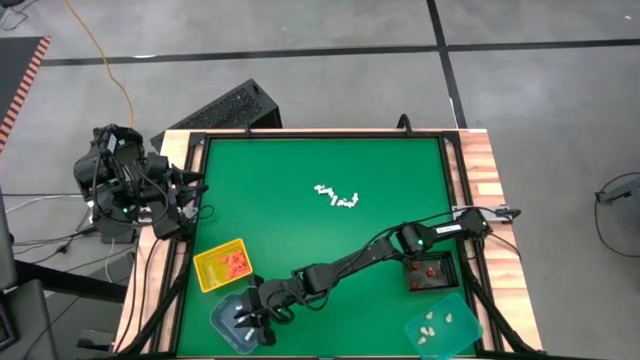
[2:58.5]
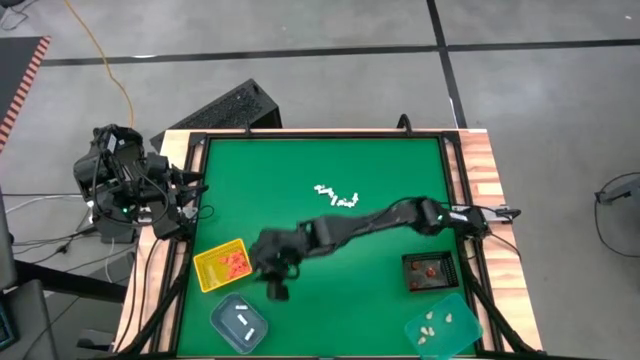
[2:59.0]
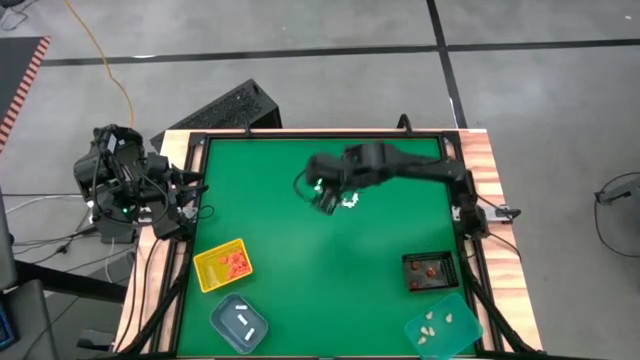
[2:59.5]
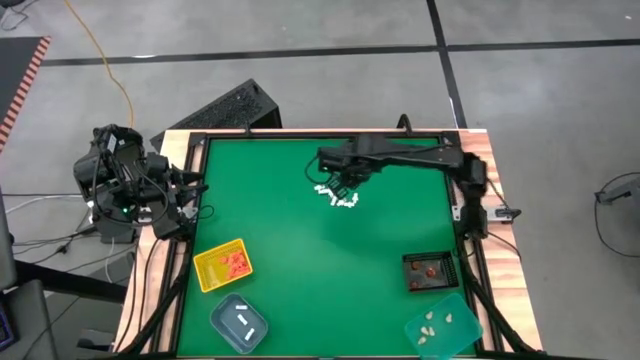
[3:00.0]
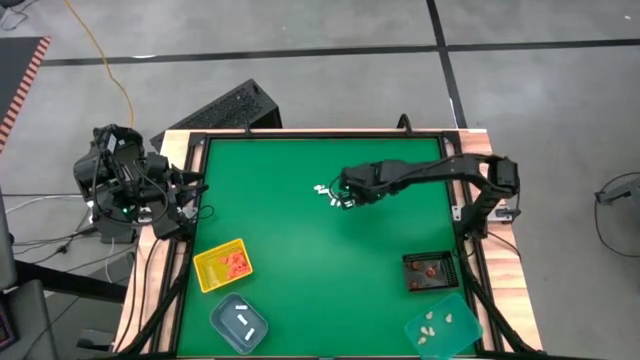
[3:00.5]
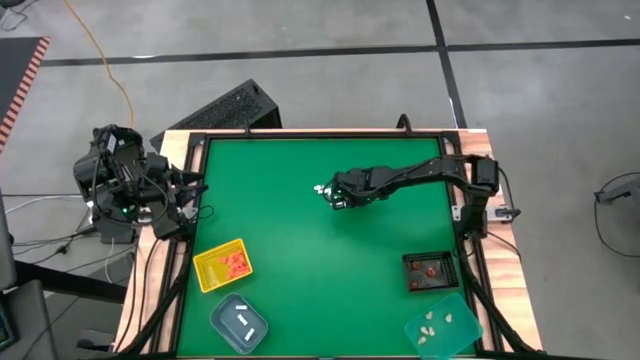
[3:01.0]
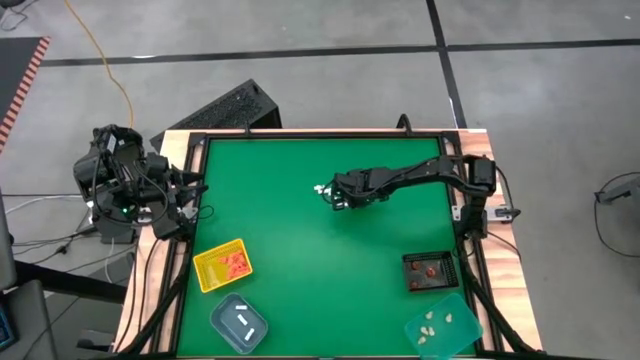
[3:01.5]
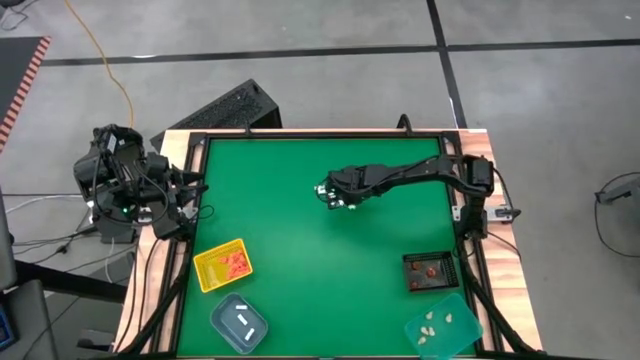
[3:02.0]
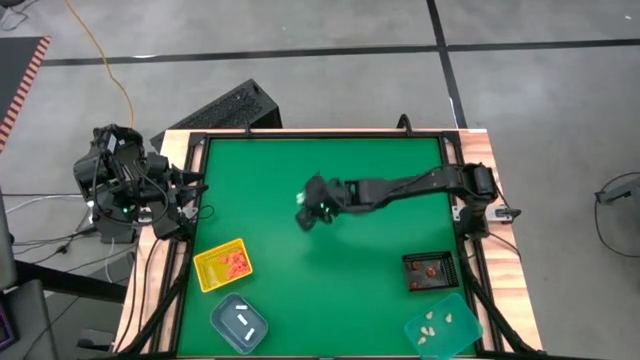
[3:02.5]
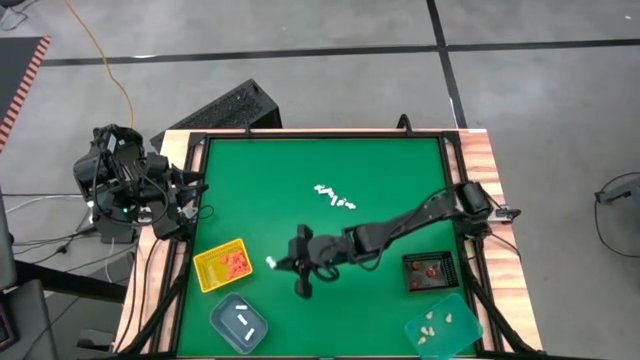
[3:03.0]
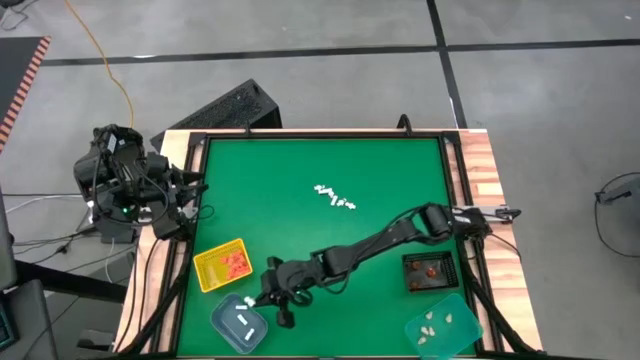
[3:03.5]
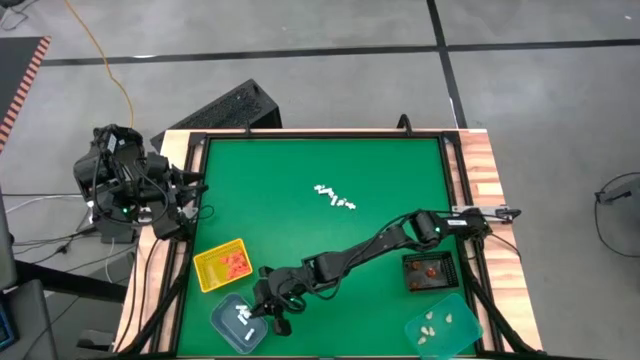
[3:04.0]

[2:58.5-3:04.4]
Task: Sort Halloween decoration
Put the white skeleton model into the blue bin

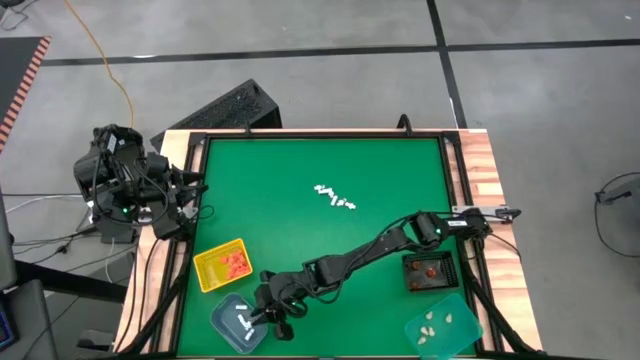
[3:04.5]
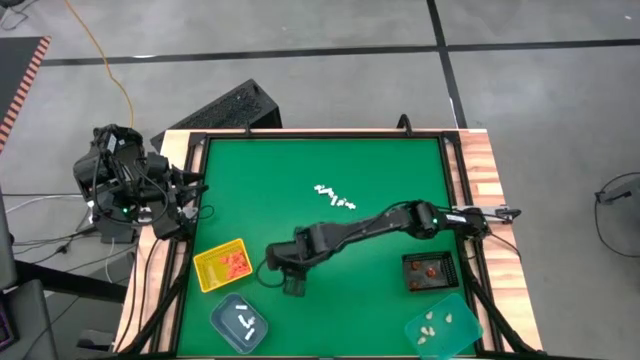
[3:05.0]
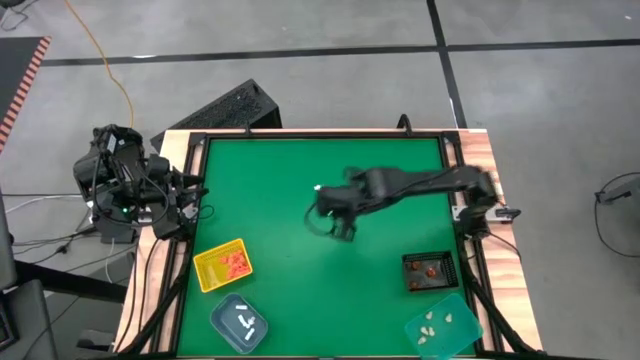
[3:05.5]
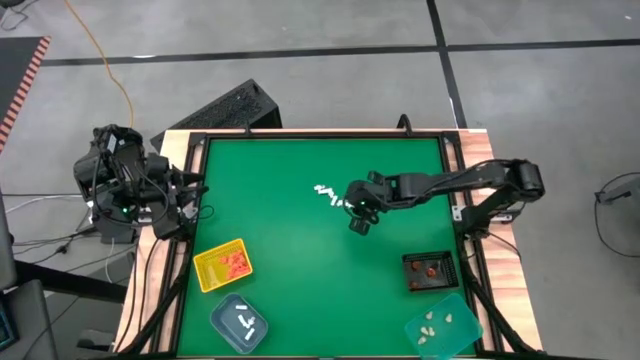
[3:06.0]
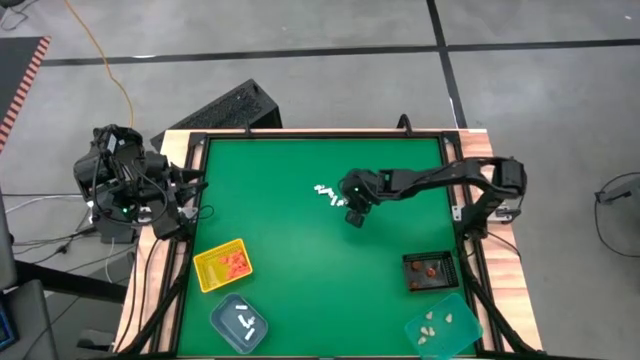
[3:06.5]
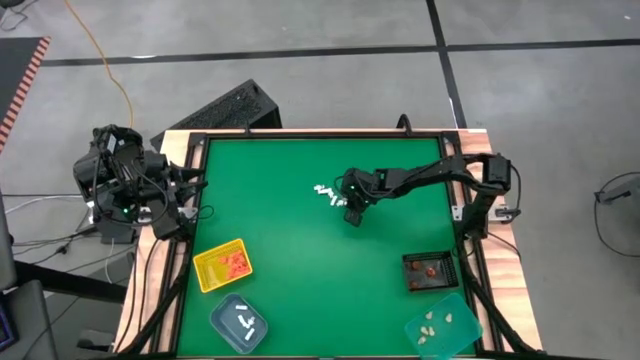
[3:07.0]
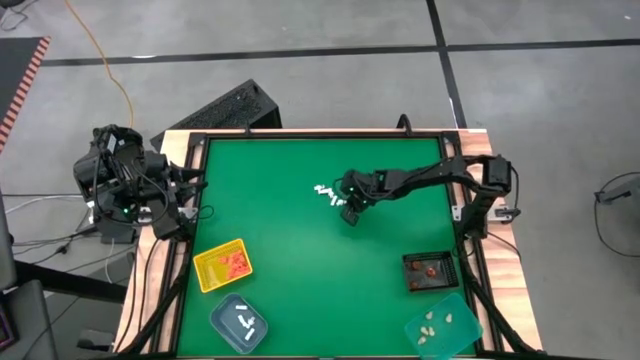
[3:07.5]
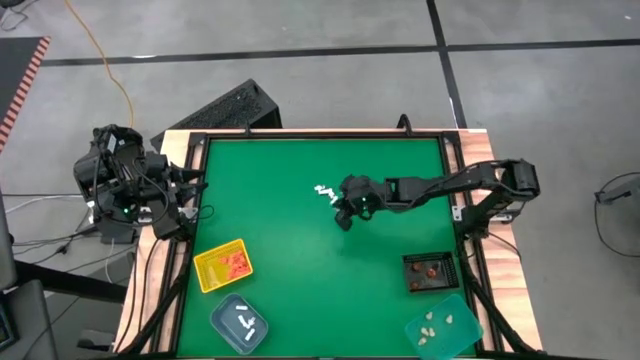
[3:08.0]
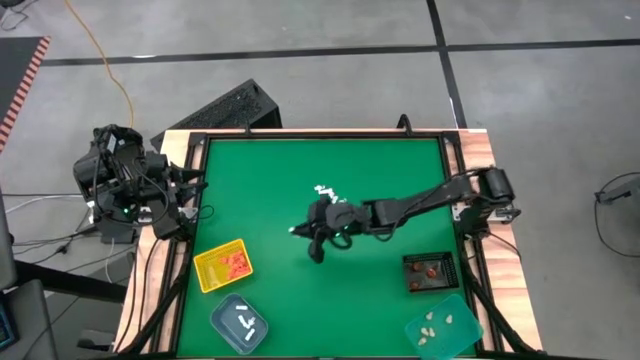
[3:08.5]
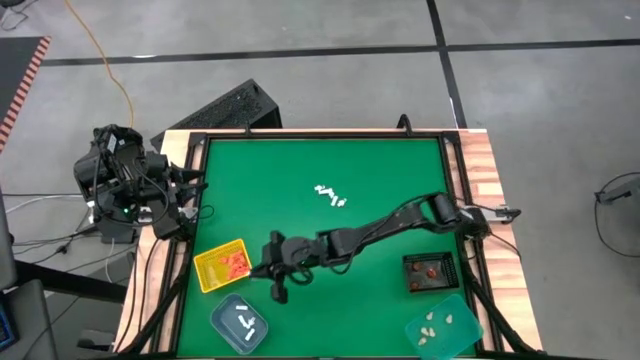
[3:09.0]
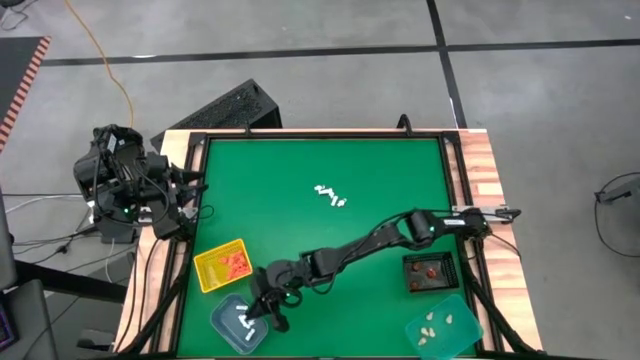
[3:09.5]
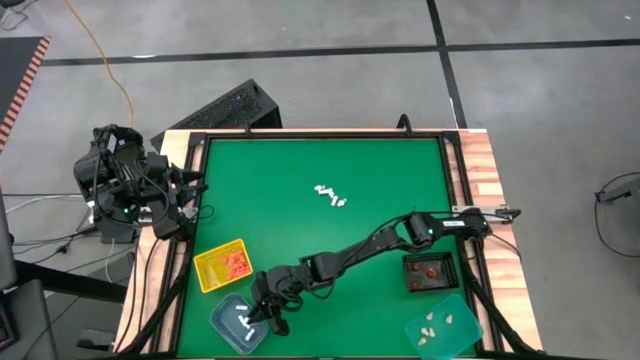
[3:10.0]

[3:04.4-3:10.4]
Put the white skeleton model into the blue bin

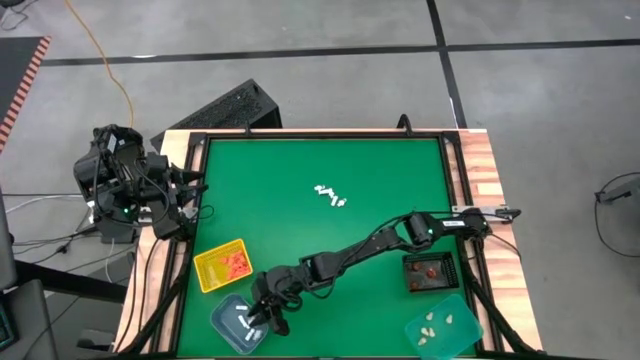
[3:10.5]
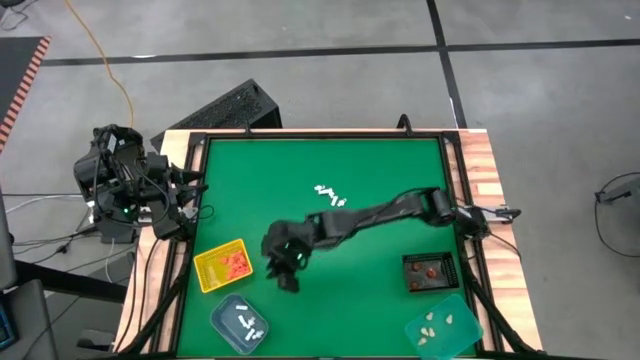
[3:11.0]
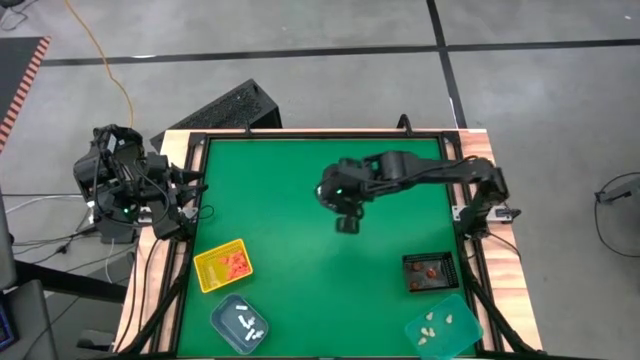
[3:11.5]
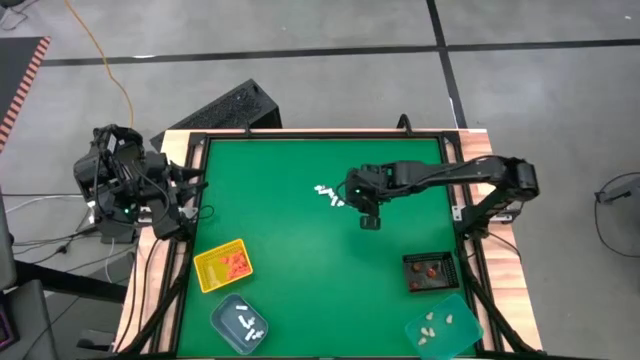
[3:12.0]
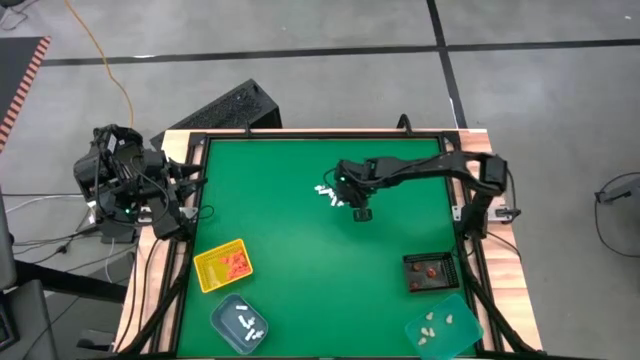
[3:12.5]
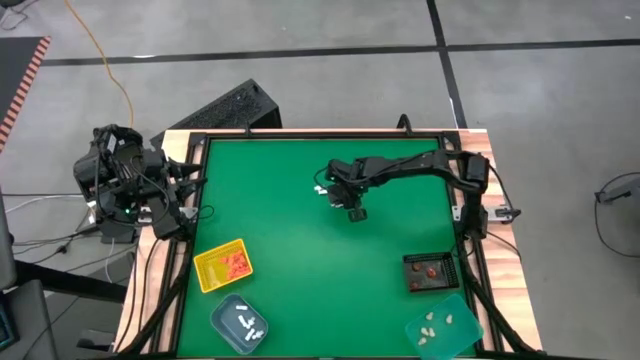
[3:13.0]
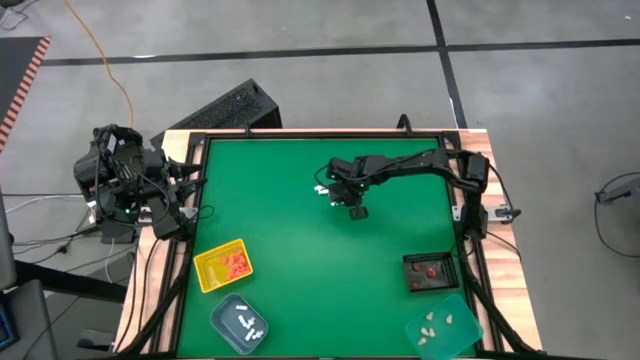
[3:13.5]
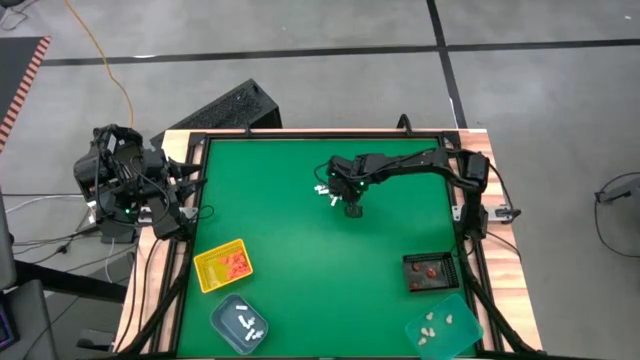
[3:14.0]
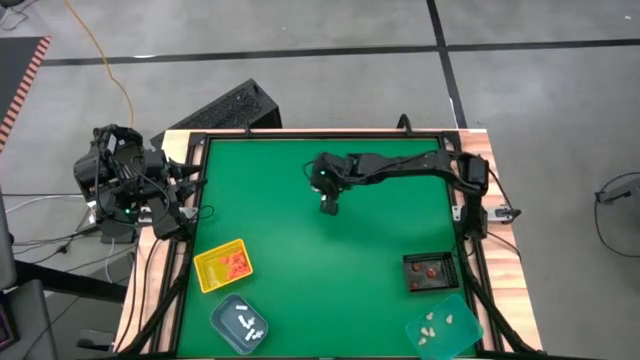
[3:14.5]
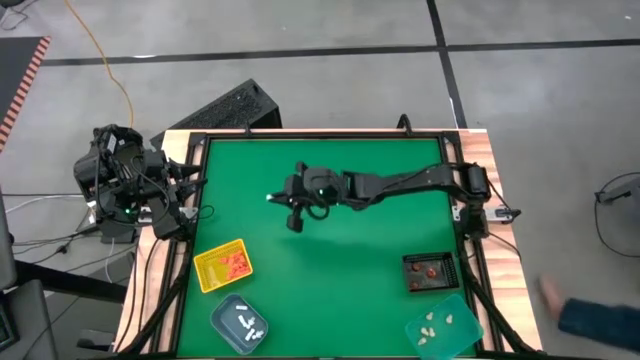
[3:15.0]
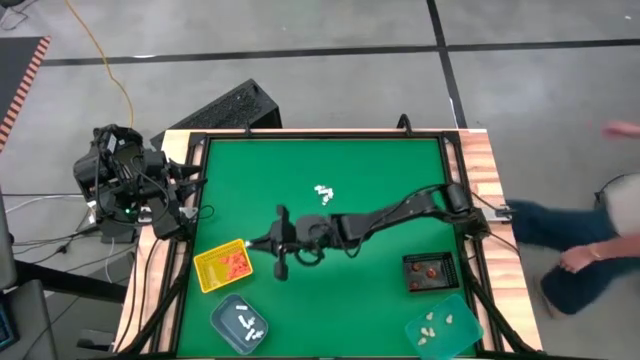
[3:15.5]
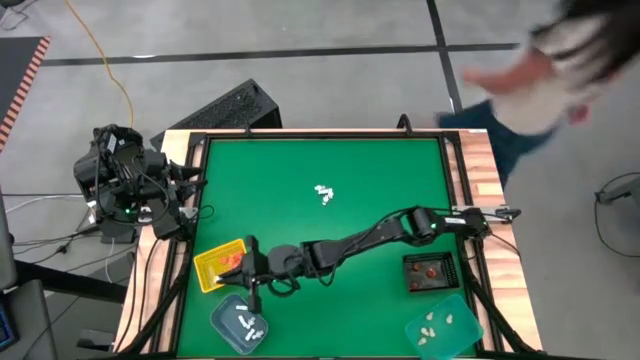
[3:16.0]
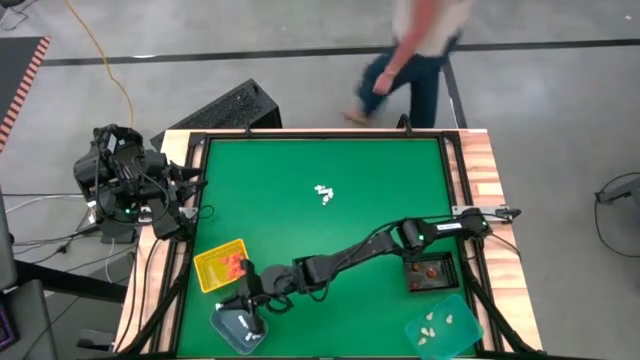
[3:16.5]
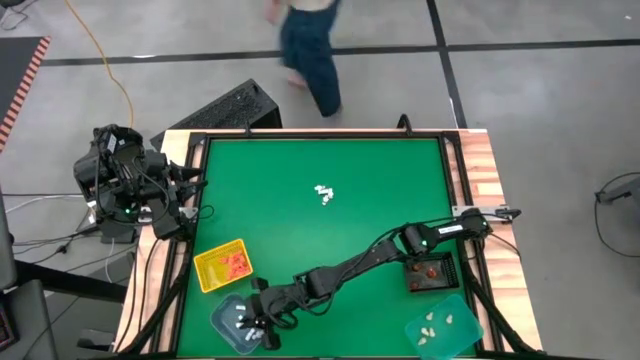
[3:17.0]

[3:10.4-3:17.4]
Put the white skeleton model into the blue bin

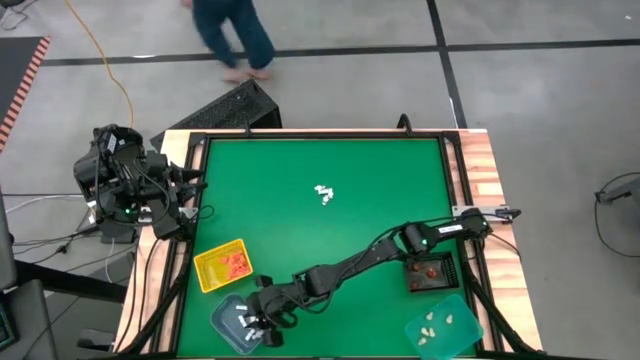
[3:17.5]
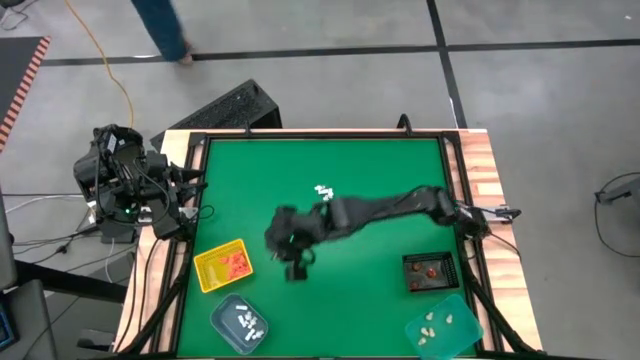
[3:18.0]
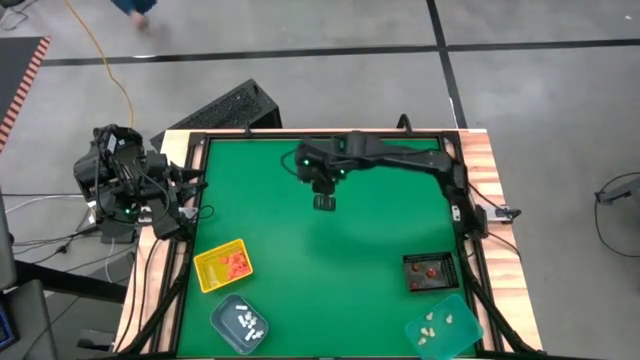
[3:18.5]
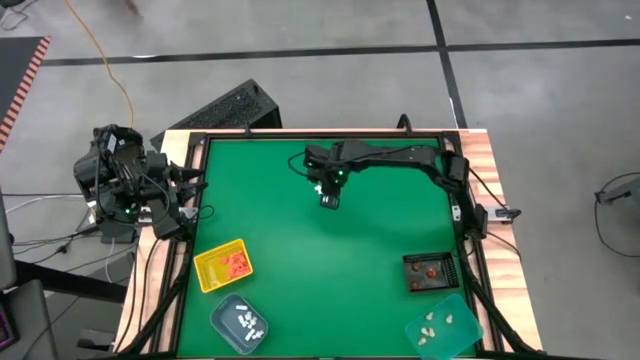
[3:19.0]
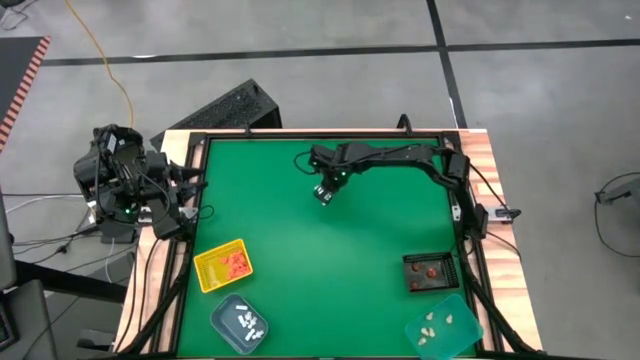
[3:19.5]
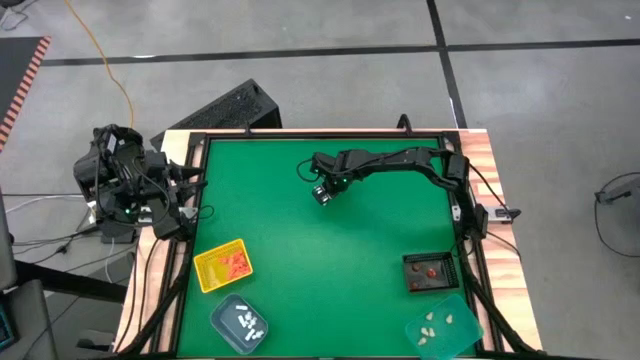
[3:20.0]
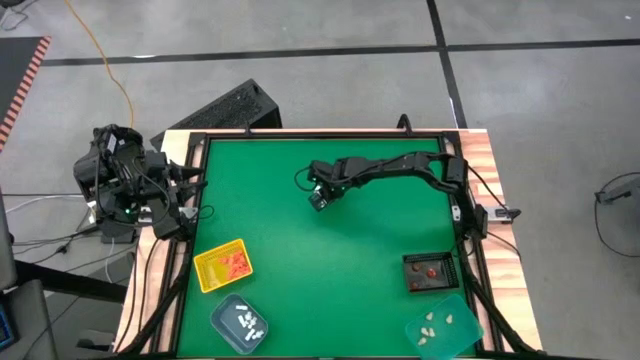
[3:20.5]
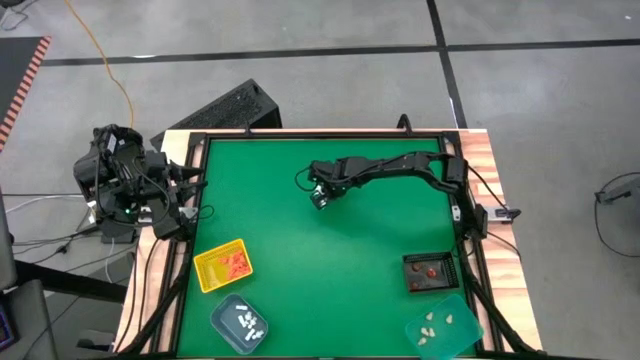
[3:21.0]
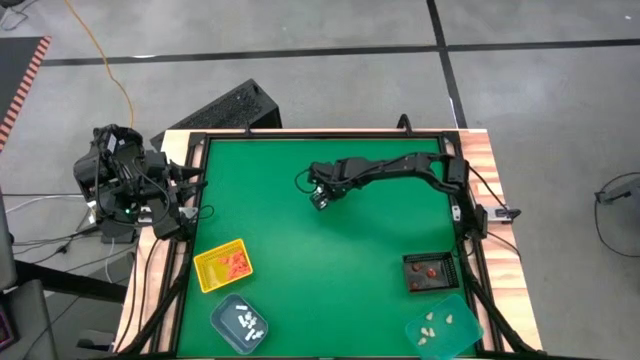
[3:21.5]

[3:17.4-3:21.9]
Put the white skeleton model into the blue bin
